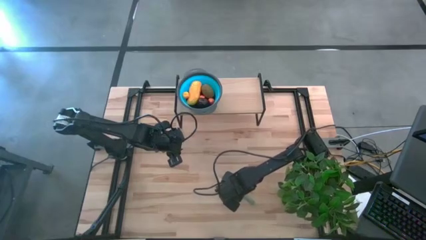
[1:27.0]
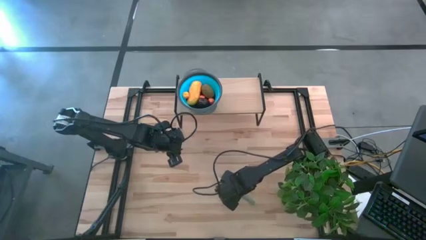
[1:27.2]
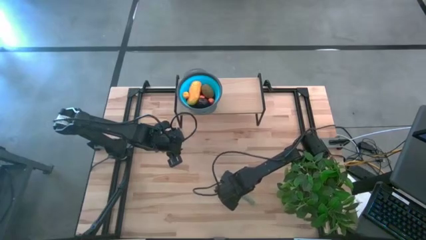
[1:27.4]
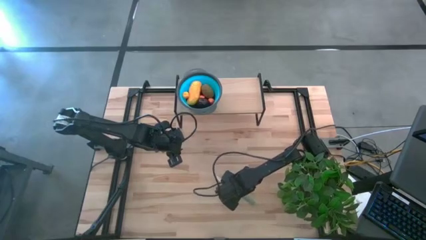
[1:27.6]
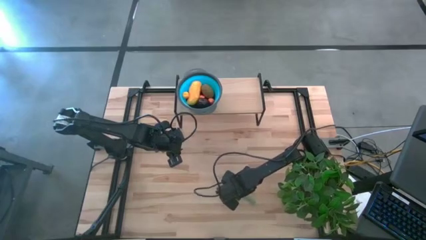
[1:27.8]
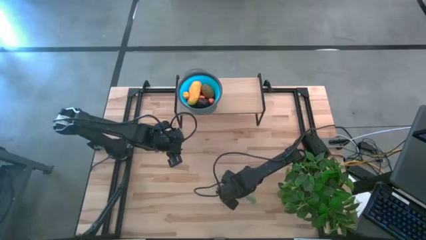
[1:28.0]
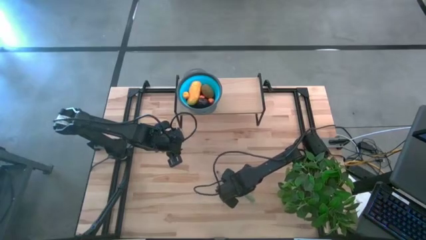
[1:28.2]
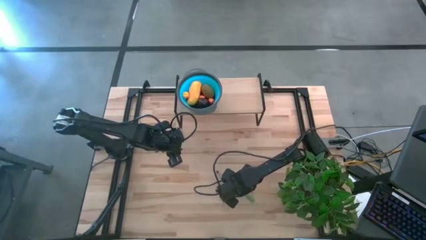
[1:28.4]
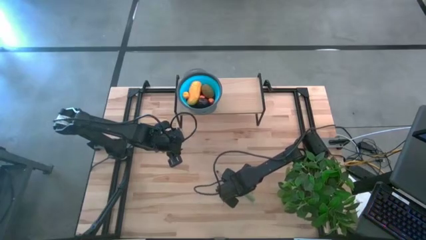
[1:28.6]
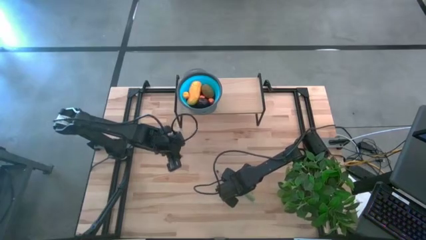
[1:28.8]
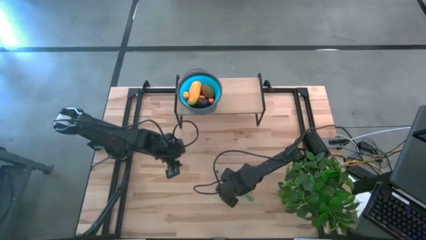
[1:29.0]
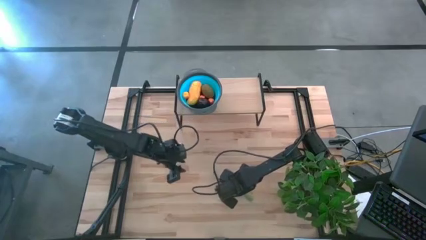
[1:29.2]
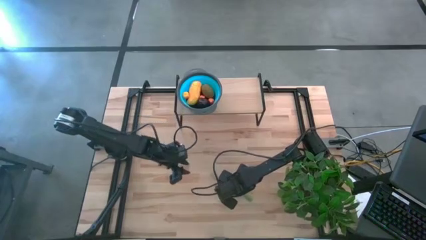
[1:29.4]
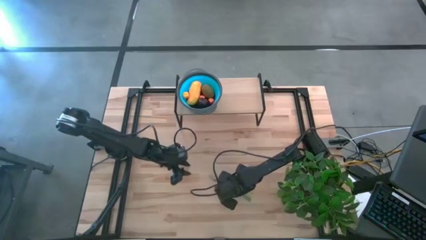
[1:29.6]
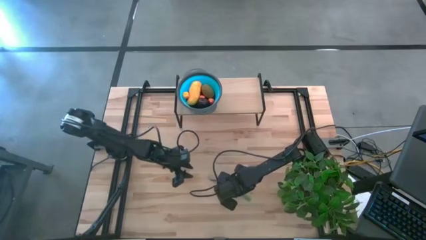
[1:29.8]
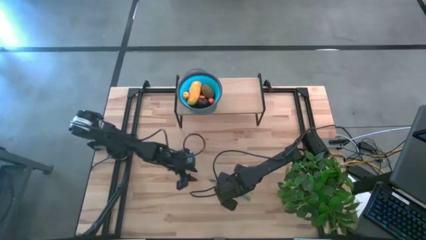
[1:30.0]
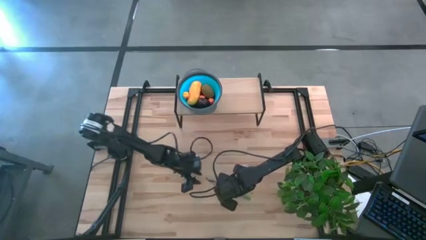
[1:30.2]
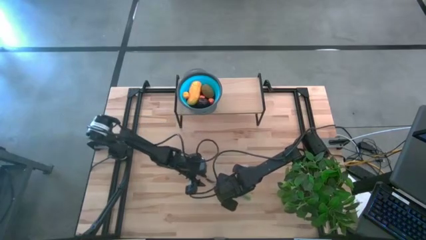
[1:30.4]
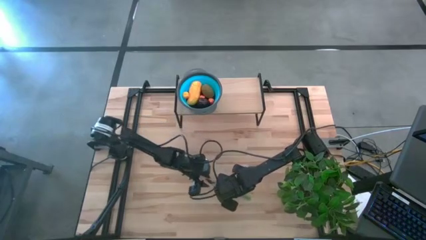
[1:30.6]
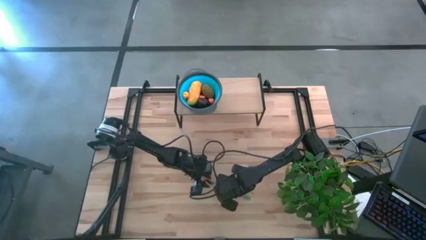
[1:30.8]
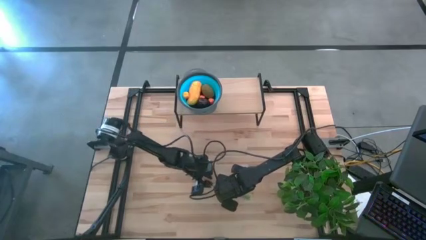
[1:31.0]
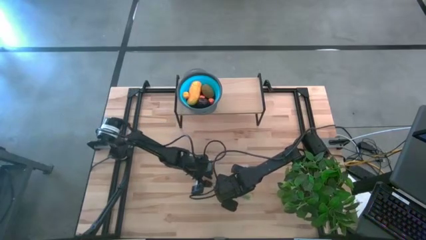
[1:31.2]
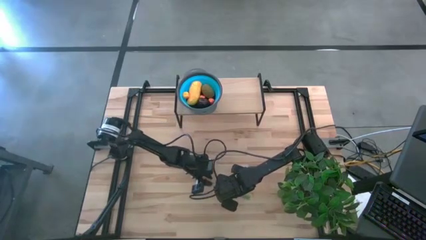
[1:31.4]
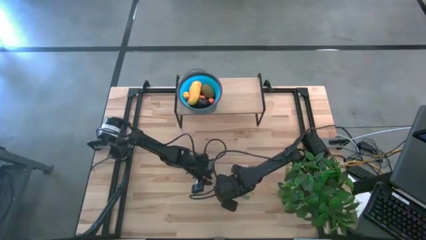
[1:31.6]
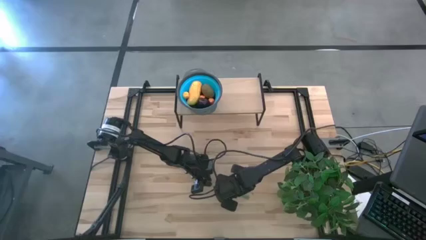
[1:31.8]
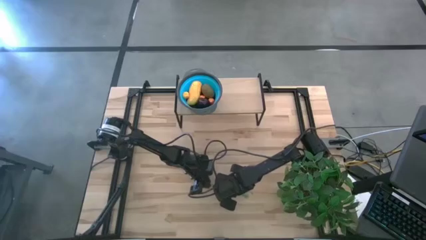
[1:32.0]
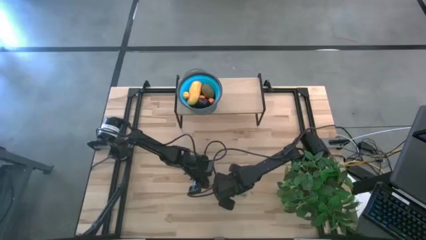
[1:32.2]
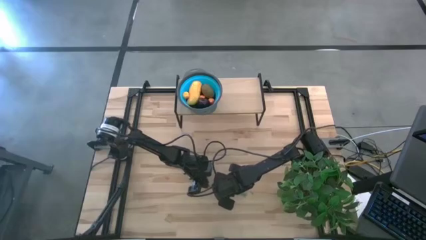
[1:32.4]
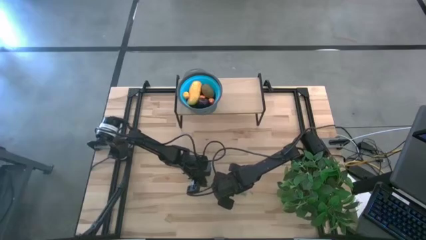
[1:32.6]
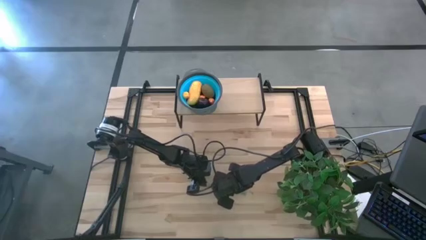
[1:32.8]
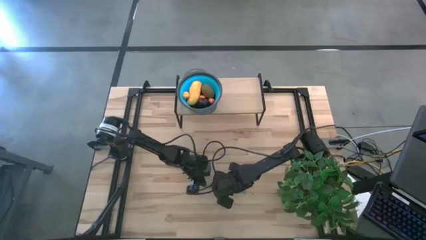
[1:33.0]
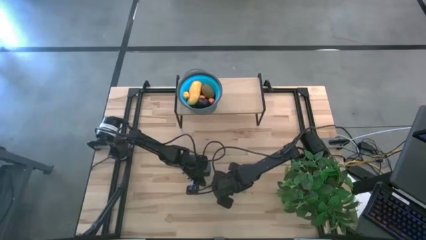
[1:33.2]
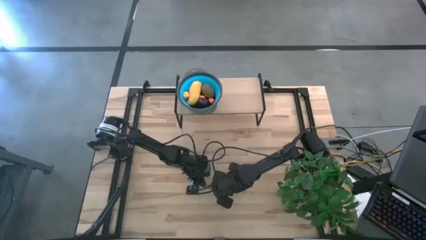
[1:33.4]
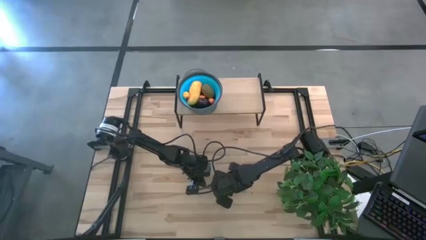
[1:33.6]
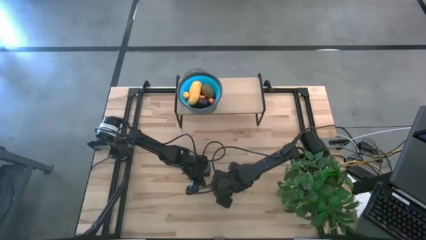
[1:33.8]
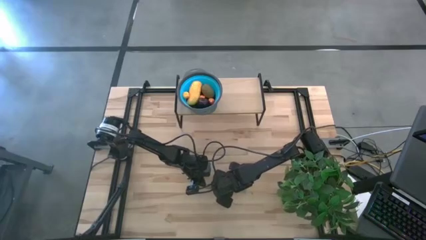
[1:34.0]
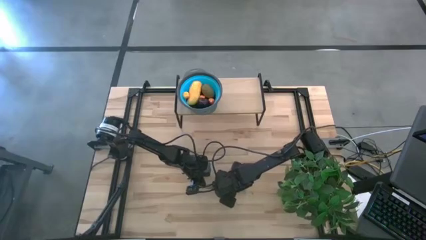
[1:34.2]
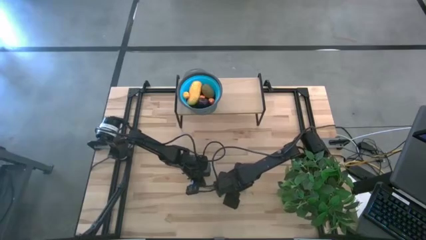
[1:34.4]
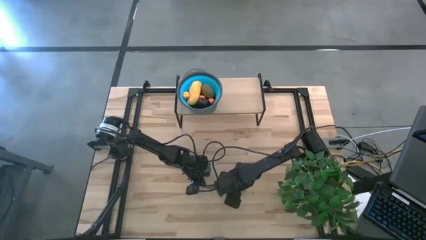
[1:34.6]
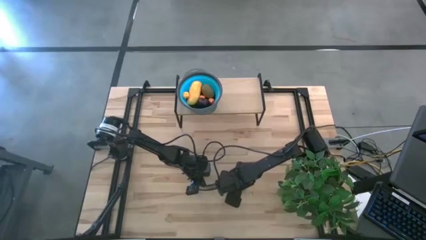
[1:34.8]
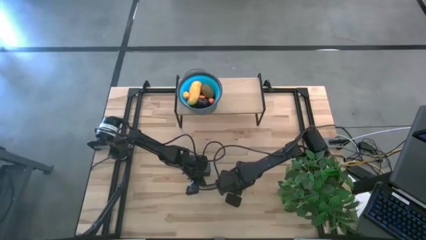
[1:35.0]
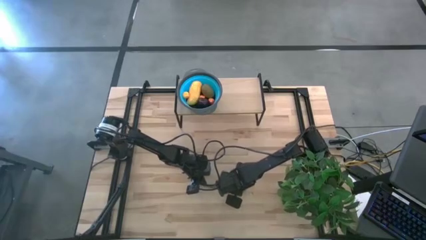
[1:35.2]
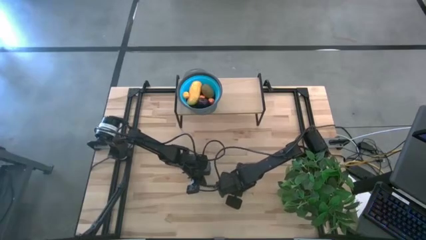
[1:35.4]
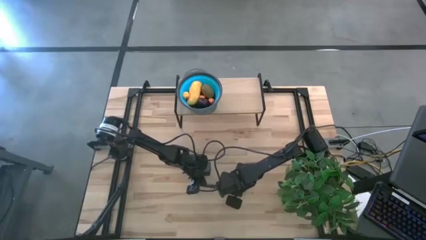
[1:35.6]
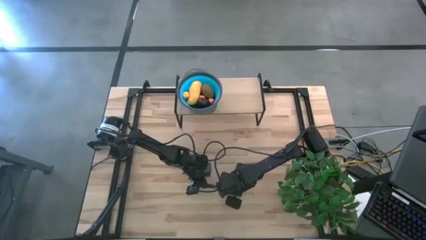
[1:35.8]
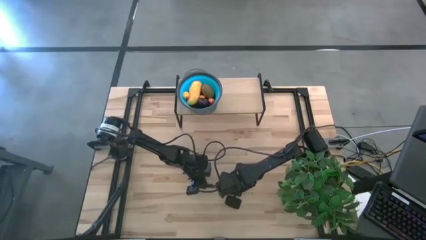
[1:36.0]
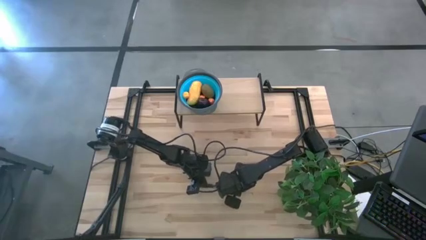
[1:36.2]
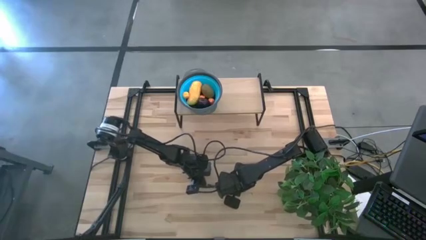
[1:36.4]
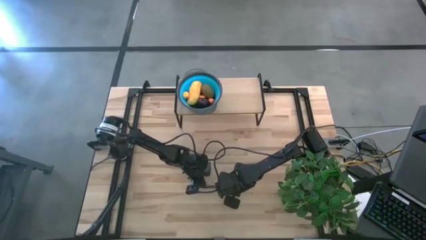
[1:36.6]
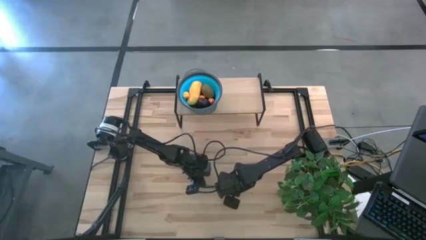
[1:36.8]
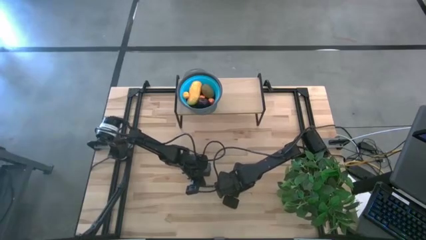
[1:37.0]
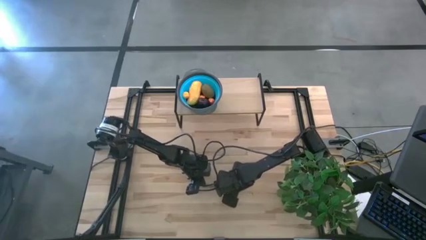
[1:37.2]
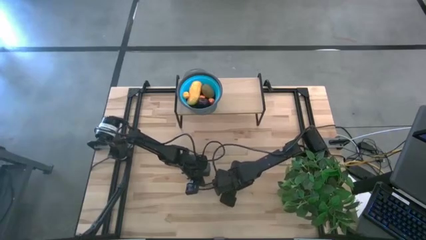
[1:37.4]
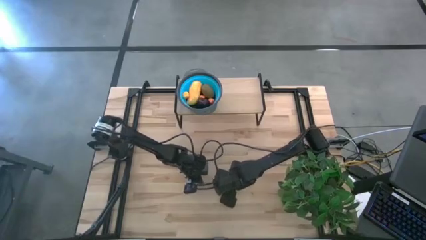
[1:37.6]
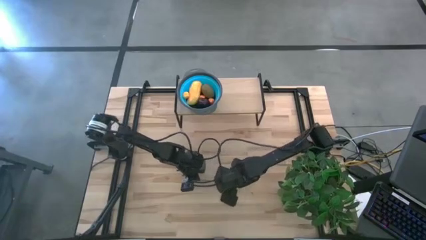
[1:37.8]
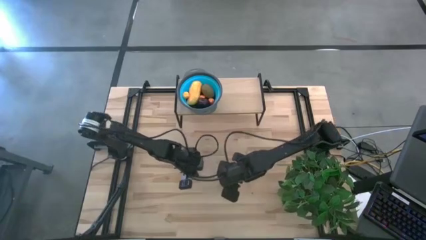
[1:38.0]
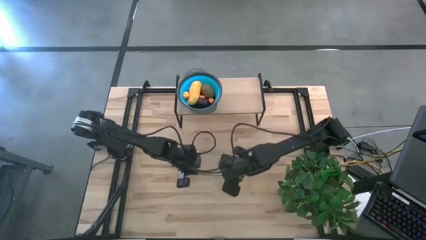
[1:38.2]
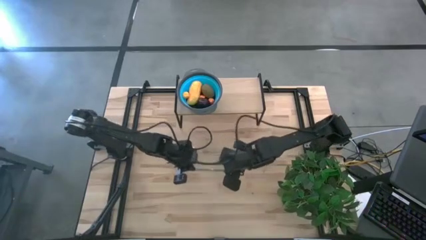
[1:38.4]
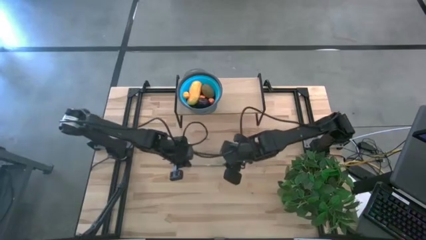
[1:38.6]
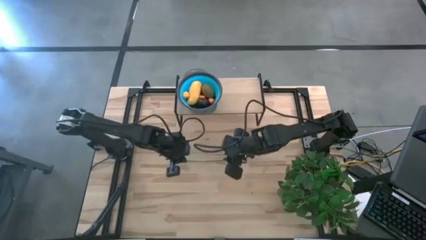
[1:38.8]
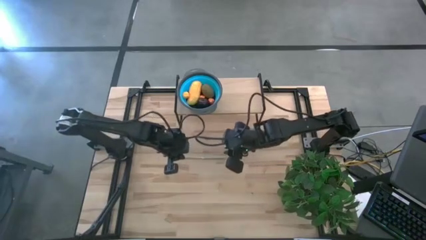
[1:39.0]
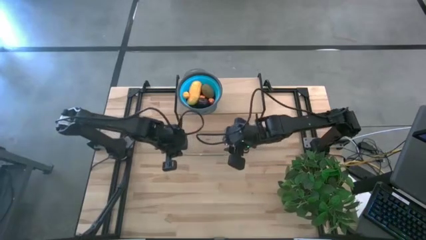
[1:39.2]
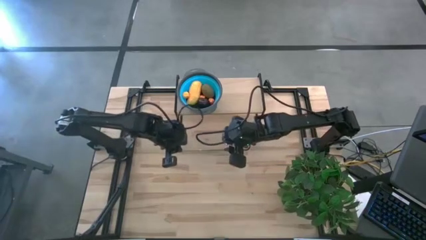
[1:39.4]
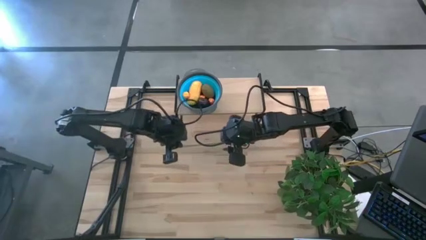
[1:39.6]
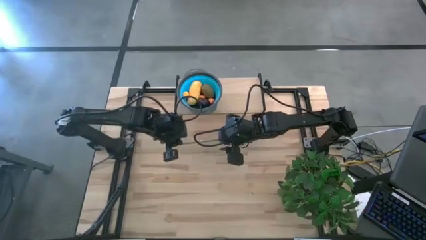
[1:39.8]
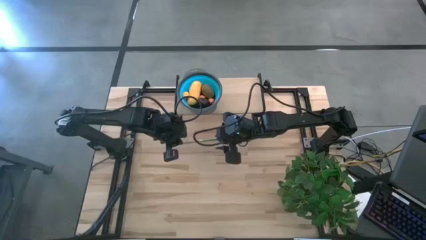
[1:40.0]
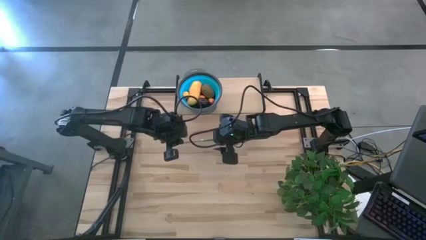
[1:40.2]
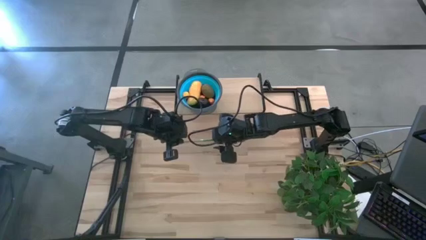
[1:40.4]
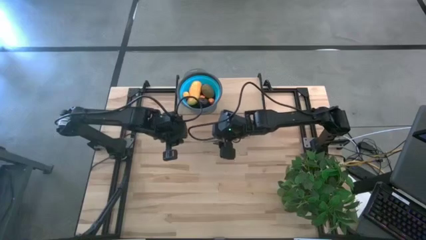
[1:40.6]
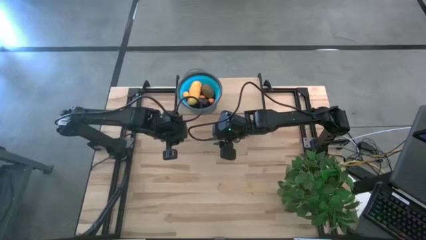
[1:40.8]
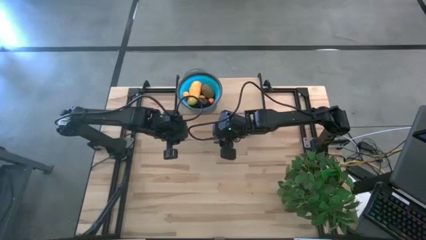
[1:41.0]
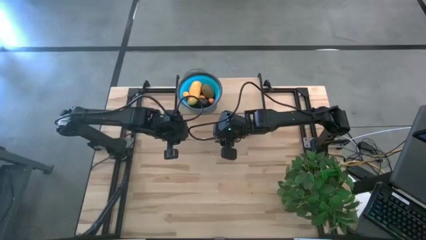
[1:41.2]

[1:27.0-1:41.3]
Task: Pick & Place Fruit
Put the table knife on the shelf
